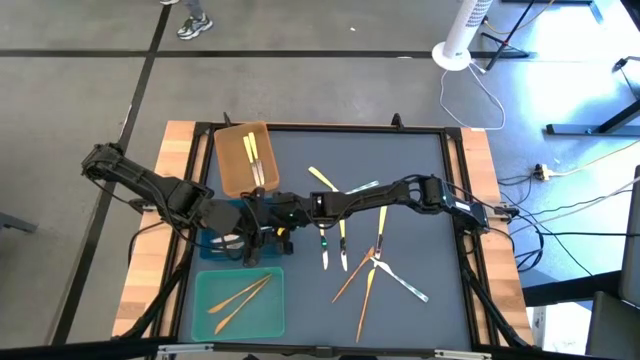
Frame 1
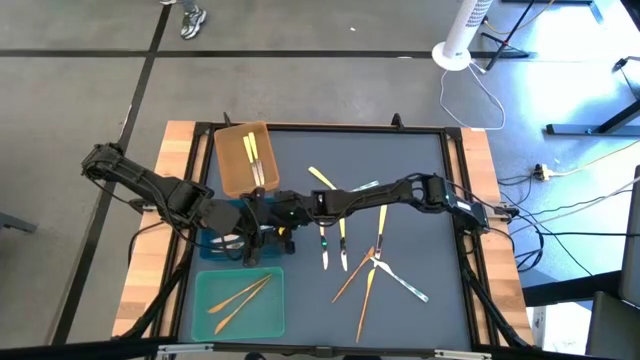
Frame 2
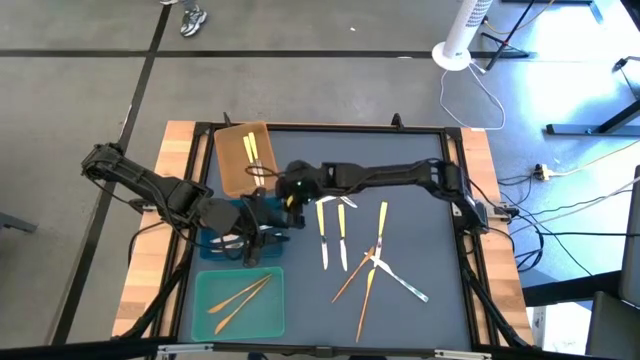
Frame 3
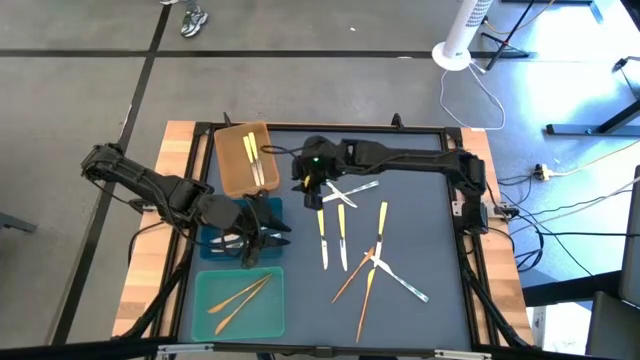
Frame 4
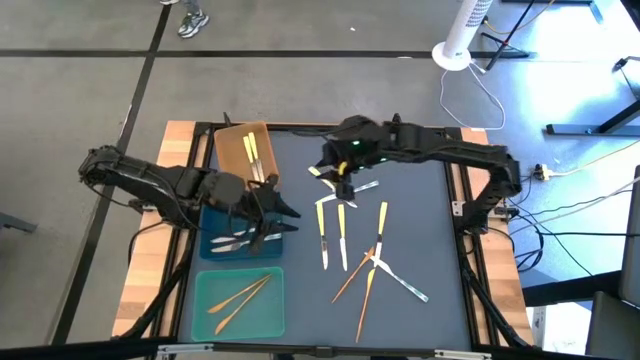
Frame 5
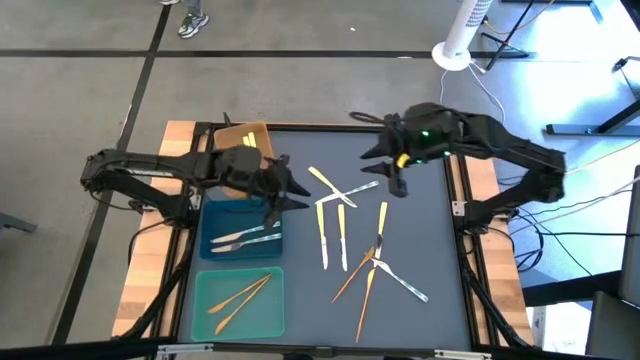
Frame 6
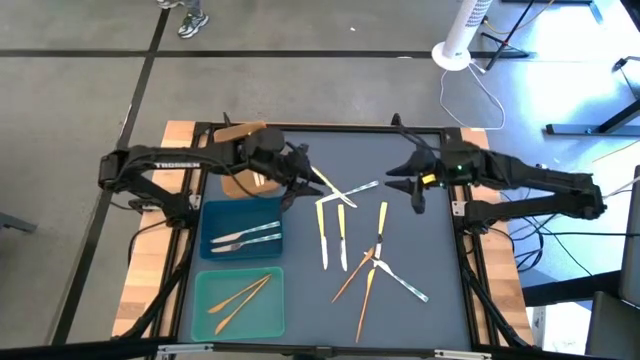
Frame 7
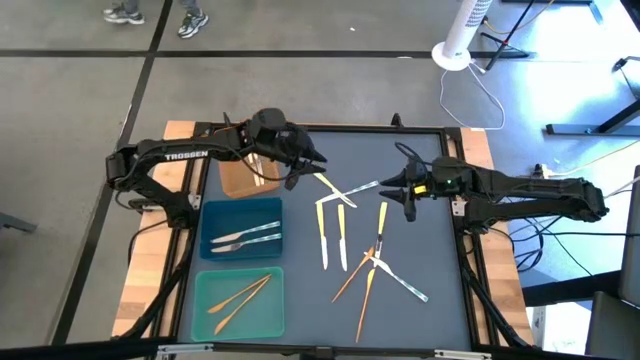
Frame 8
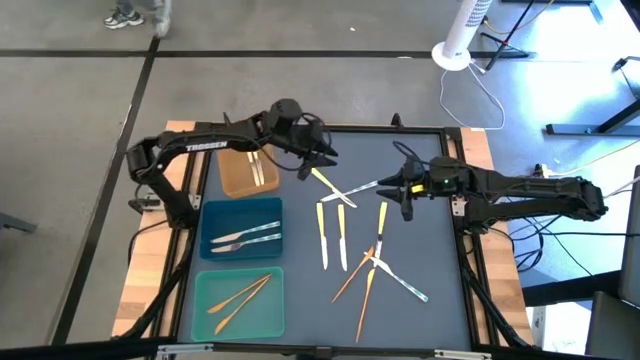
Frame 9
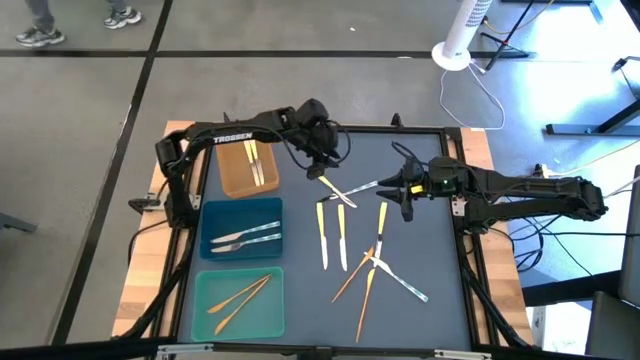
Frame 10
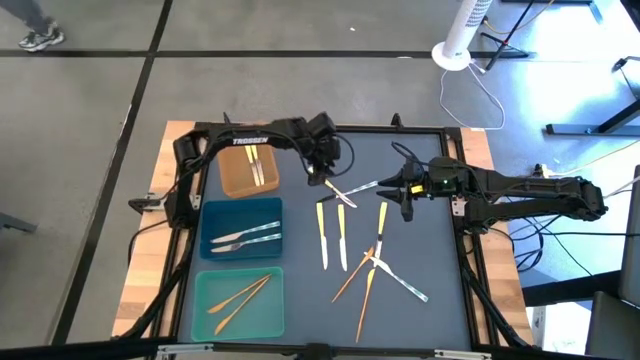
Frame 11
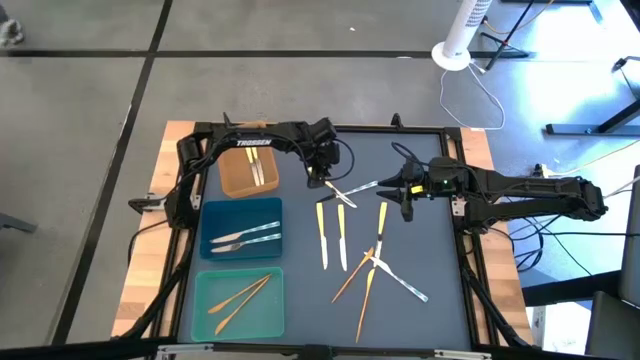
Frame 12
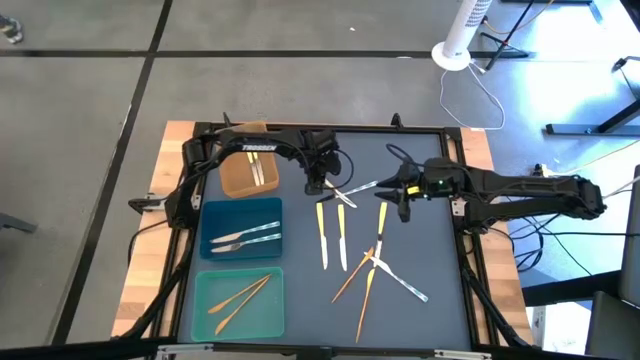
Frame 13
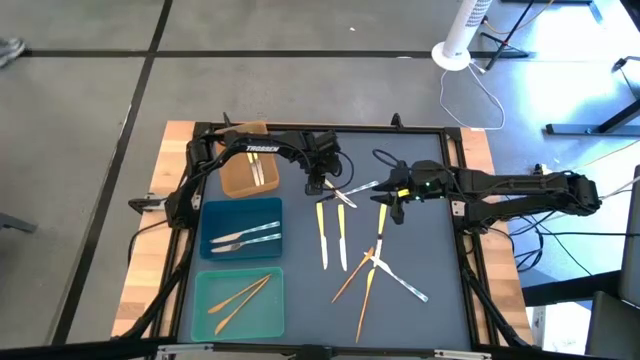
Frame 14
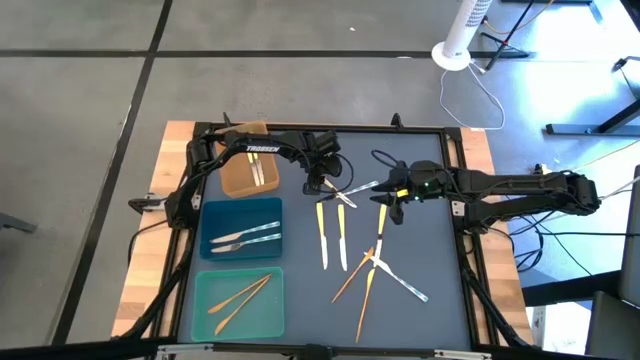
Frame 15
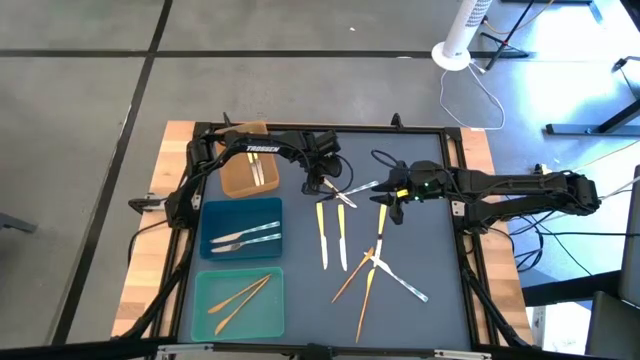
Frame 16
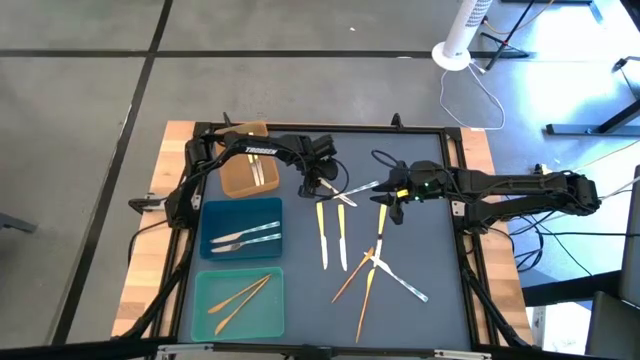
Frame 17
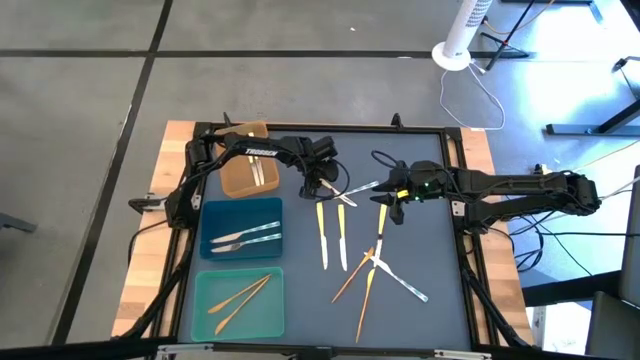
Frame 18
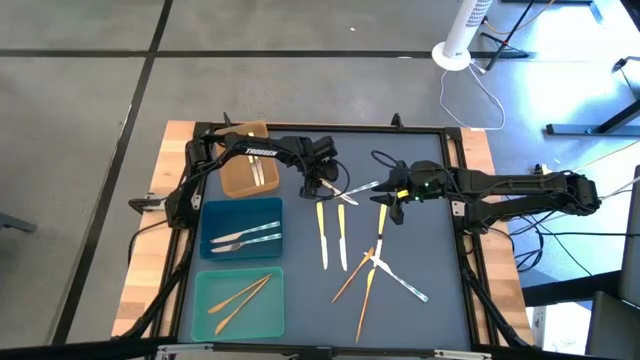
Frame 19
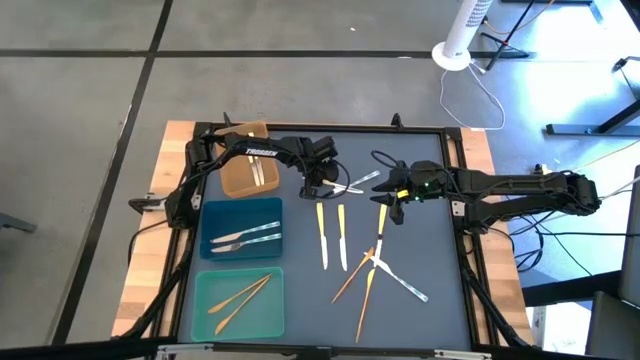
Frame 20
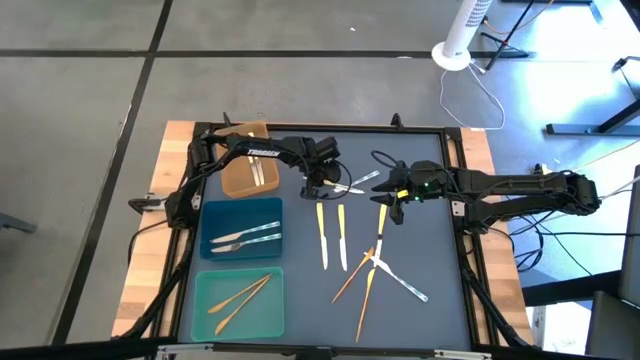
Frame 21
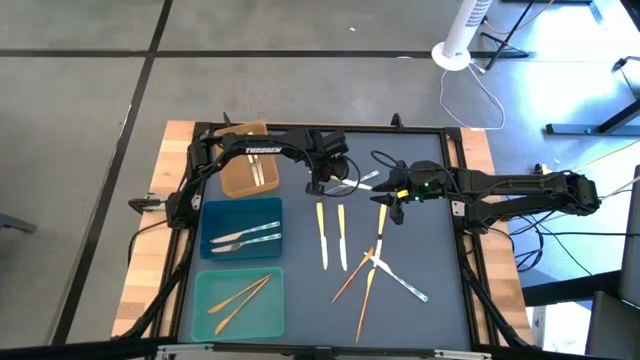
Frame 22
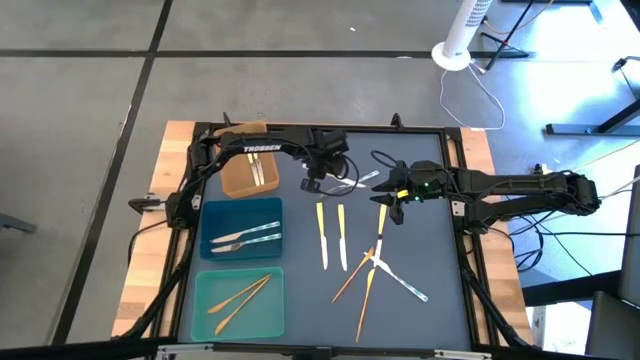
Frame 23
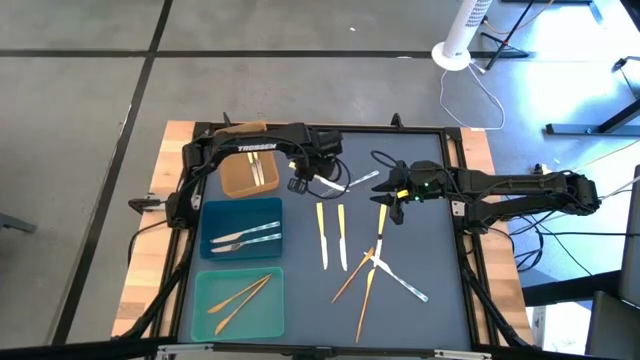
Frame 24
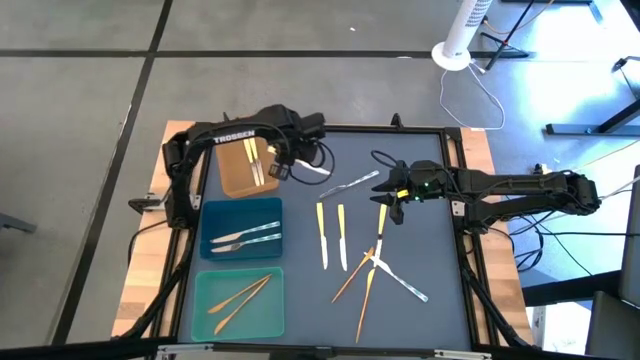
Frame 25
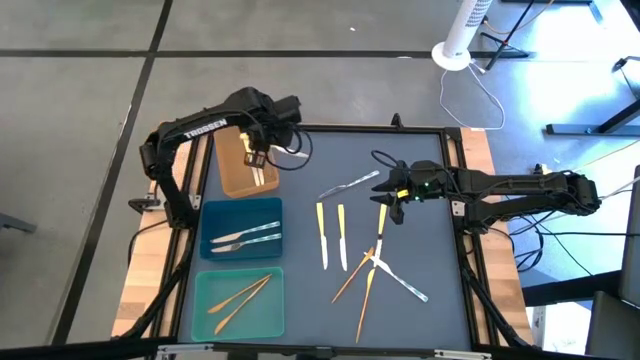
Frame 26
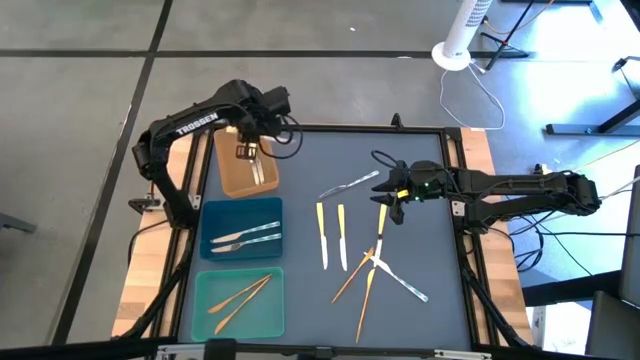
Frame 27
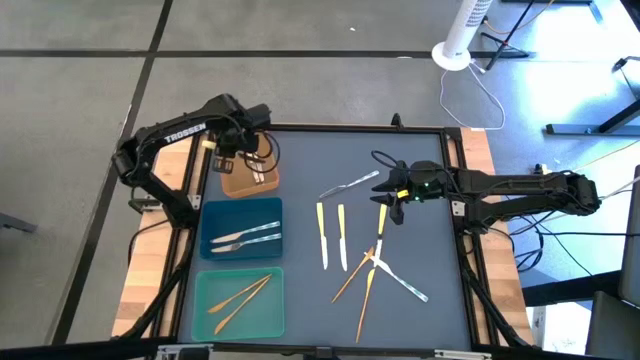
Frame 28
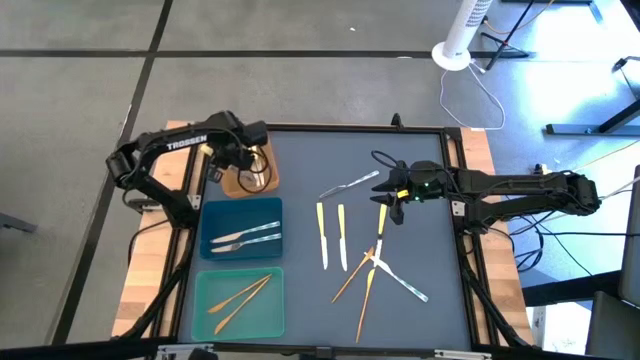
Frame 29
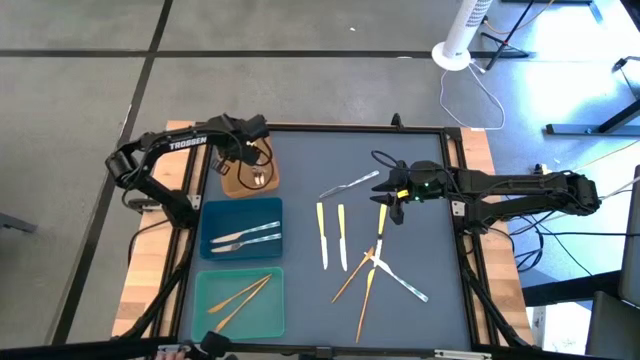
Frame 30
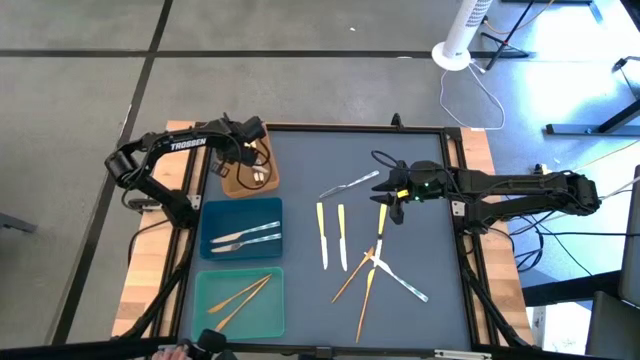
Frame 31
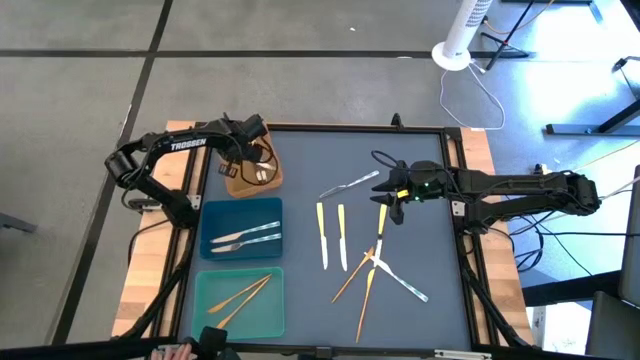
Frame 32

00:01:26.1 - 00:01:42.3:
Task: Sort silverware by color (type)
Put the yellow knife into the orange bin

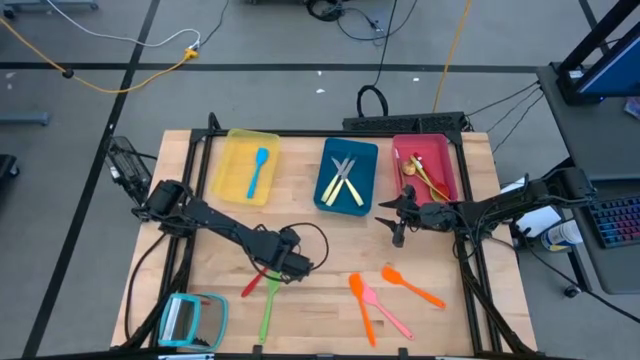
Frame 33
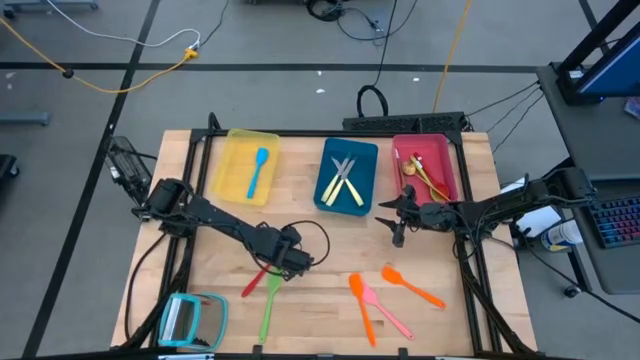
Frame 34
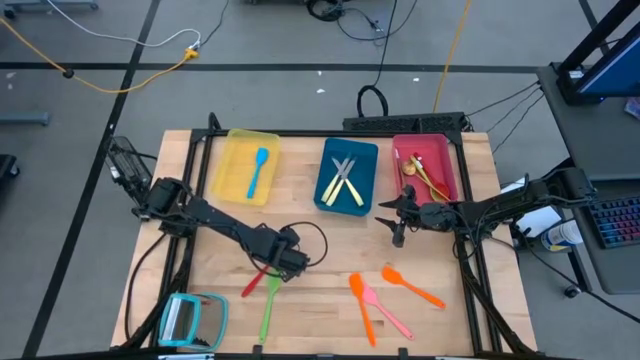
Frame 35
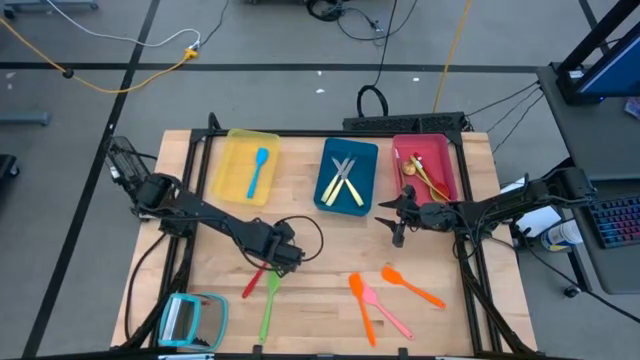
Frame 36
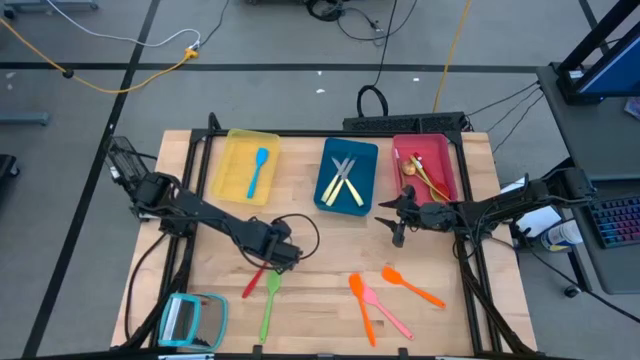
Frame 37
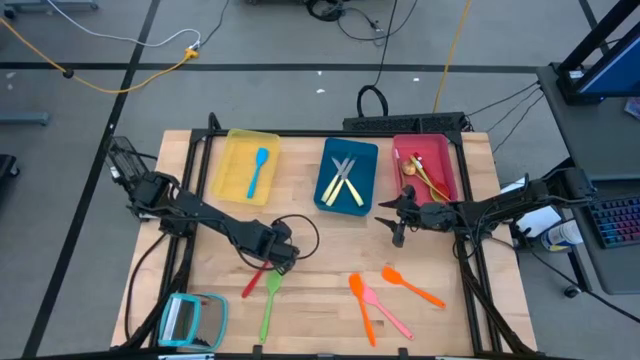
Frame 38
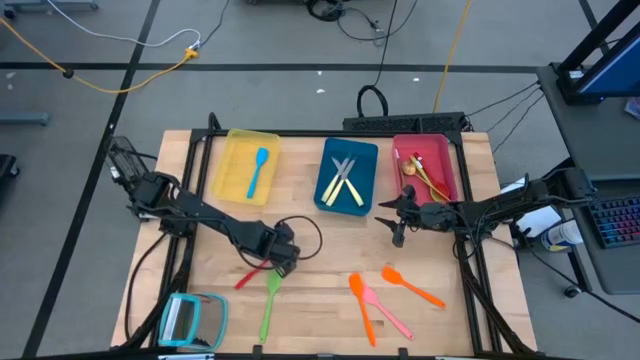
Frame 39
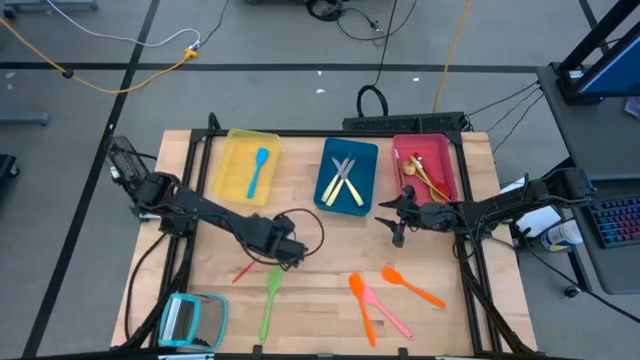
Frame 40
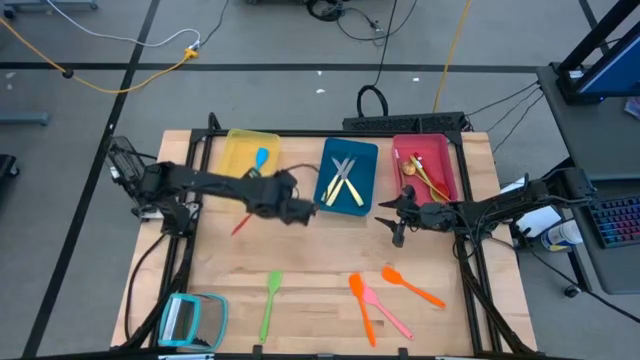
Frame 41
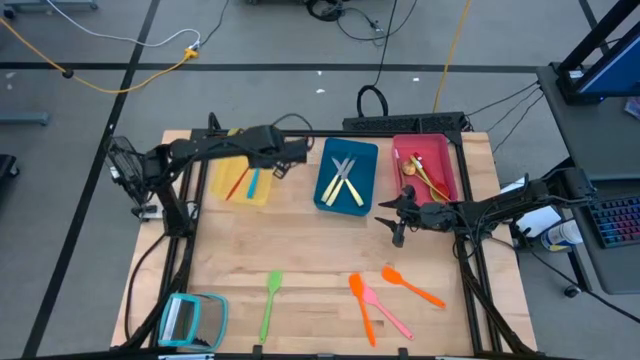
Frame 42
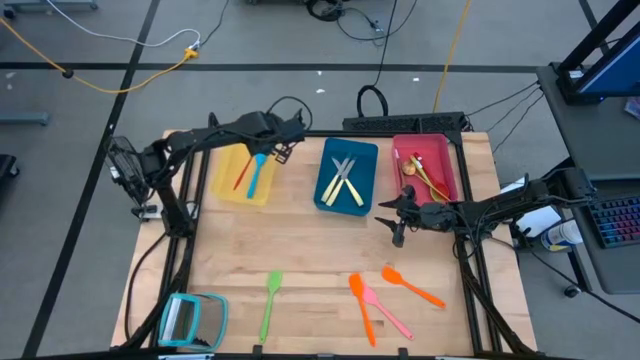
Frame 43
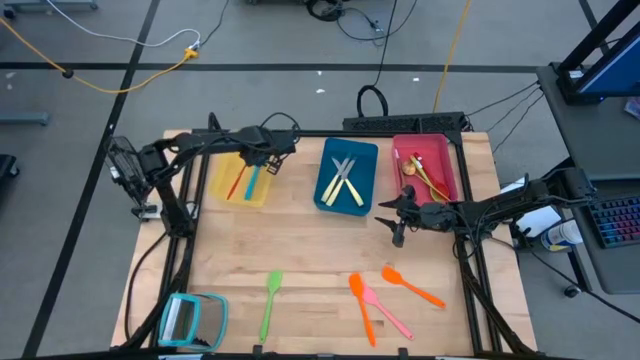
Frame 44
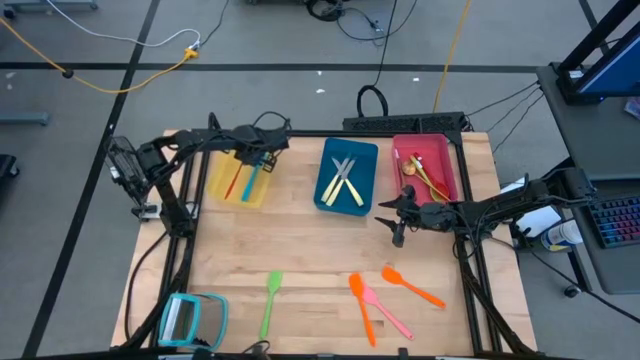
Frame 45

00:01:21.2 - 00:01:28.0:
Task: Pick & Place Kitchen Items
Put the red spatula into the yellow bin
